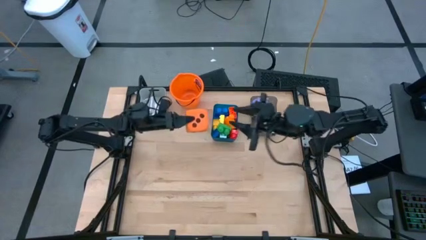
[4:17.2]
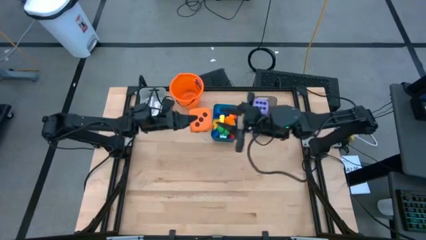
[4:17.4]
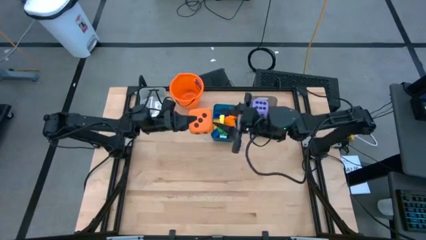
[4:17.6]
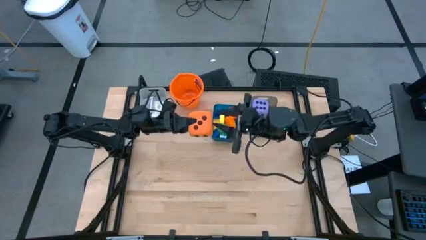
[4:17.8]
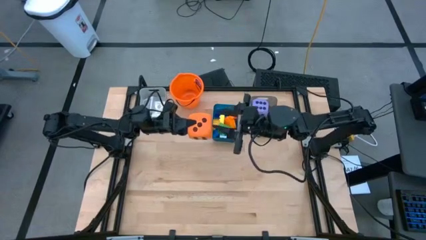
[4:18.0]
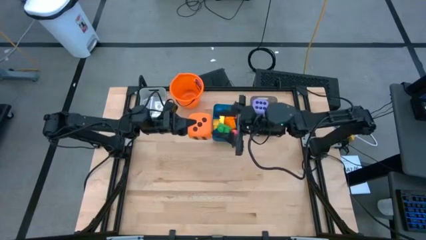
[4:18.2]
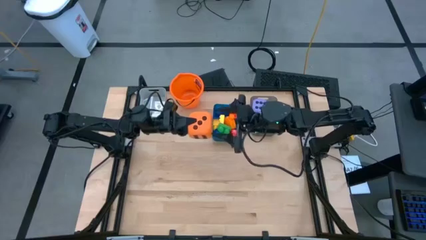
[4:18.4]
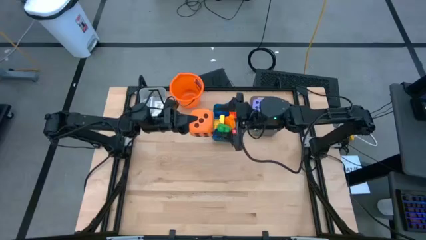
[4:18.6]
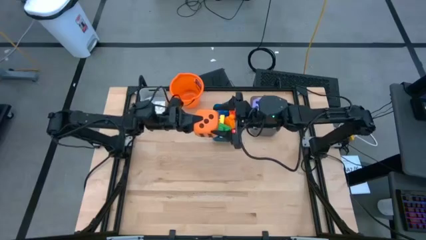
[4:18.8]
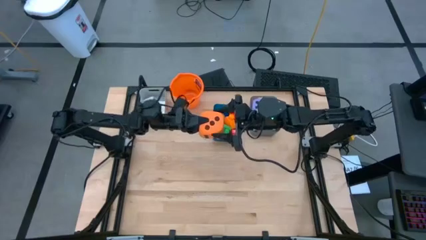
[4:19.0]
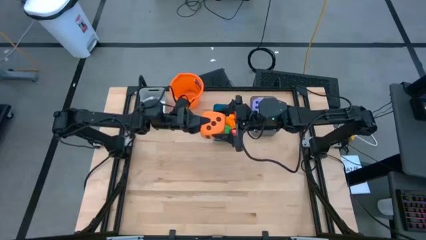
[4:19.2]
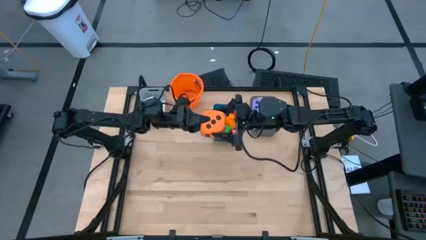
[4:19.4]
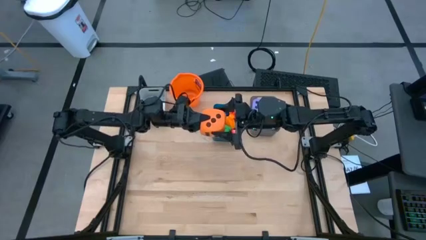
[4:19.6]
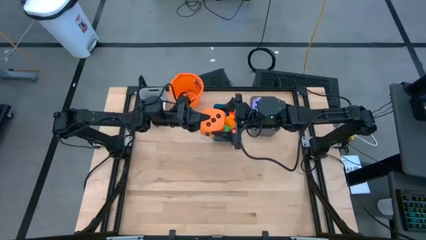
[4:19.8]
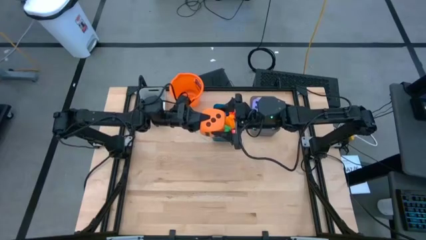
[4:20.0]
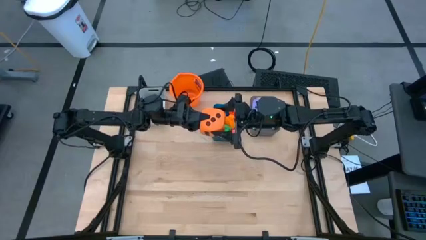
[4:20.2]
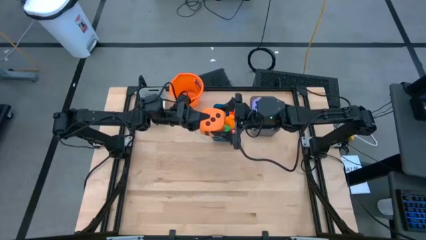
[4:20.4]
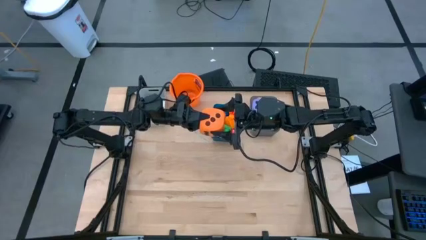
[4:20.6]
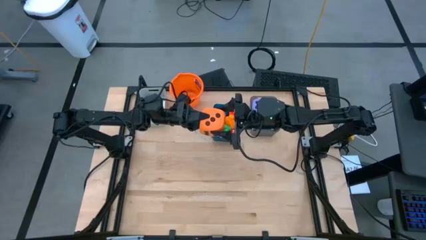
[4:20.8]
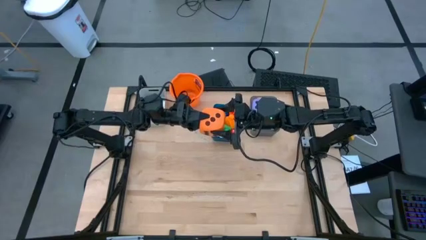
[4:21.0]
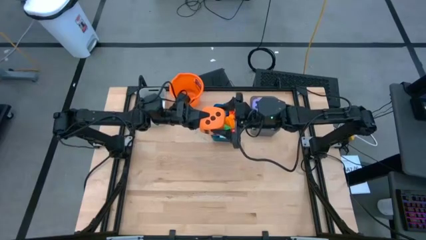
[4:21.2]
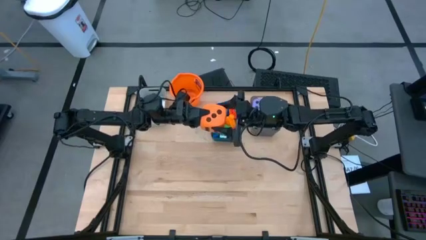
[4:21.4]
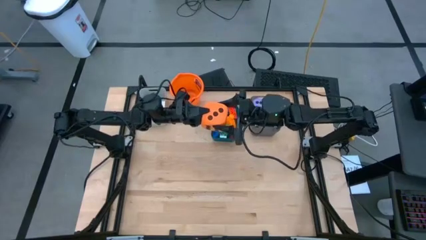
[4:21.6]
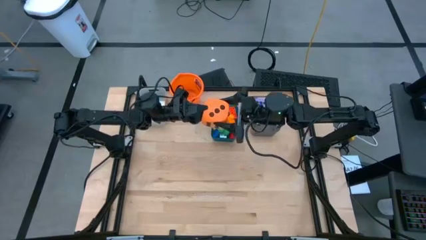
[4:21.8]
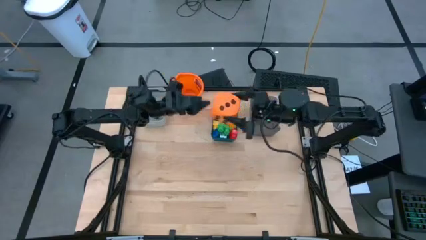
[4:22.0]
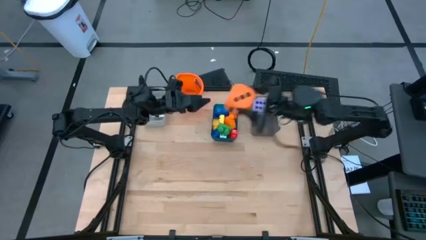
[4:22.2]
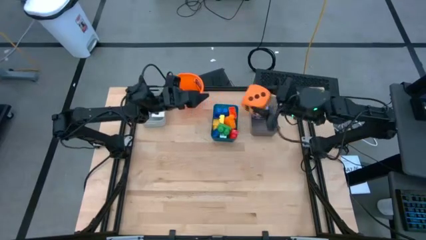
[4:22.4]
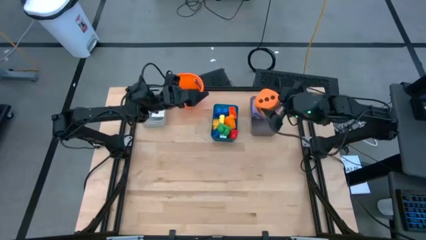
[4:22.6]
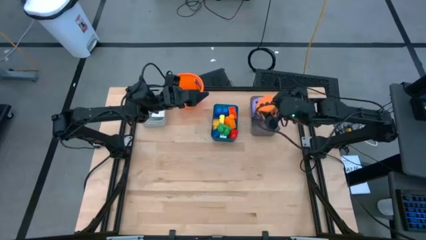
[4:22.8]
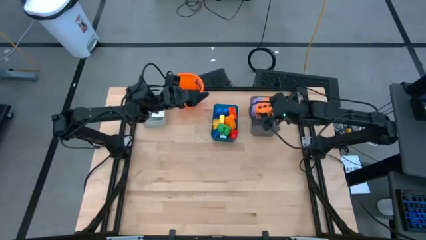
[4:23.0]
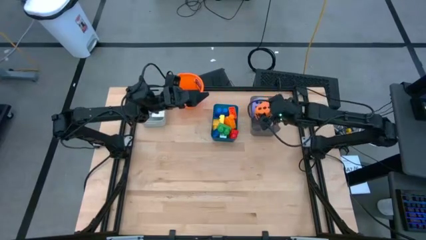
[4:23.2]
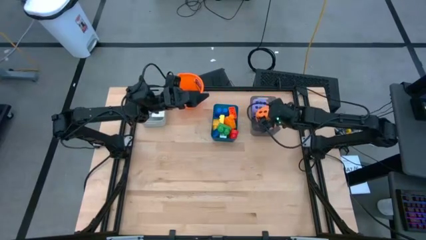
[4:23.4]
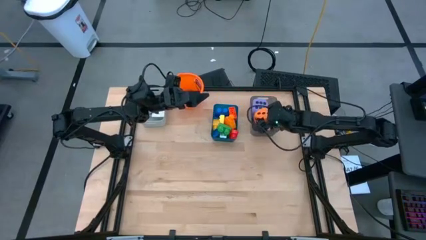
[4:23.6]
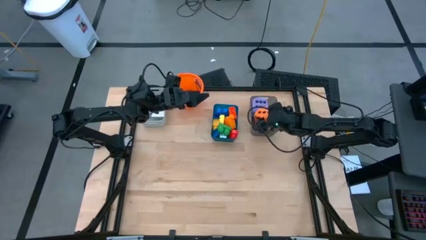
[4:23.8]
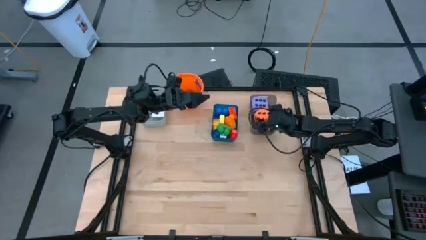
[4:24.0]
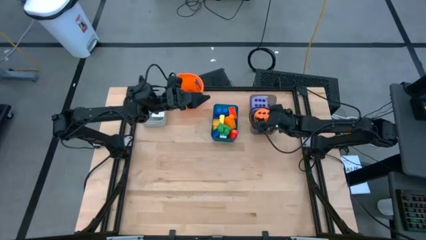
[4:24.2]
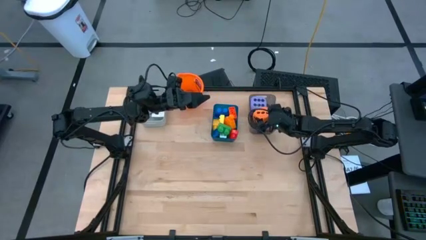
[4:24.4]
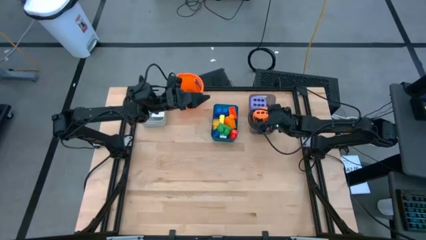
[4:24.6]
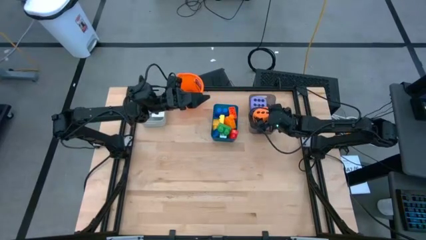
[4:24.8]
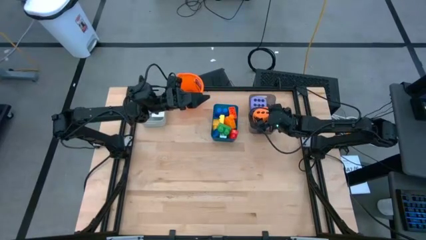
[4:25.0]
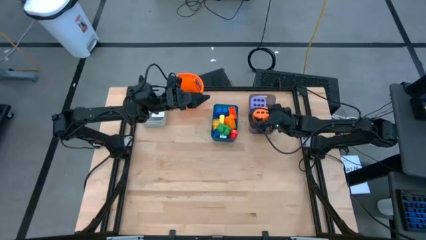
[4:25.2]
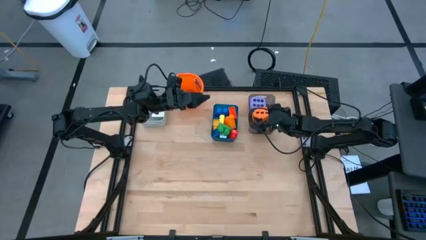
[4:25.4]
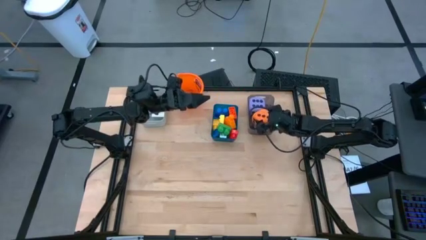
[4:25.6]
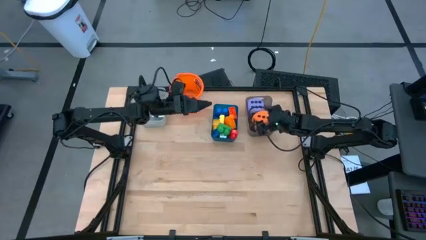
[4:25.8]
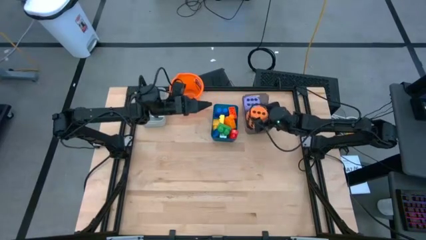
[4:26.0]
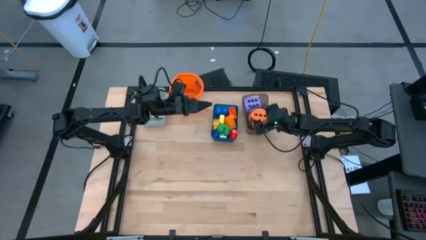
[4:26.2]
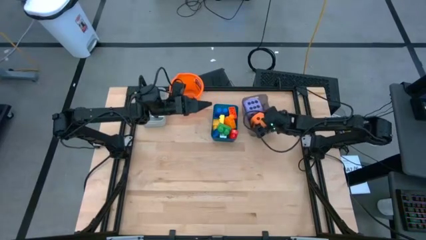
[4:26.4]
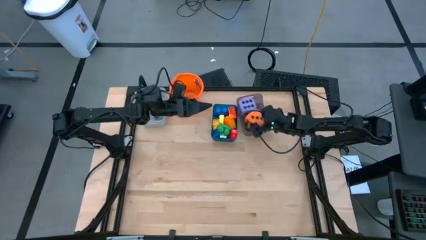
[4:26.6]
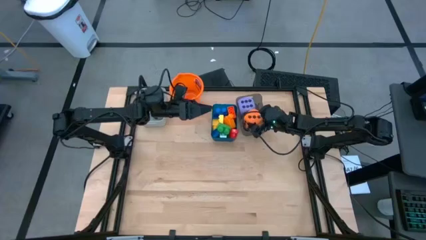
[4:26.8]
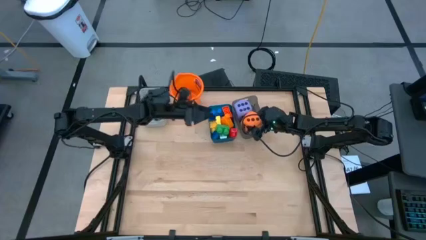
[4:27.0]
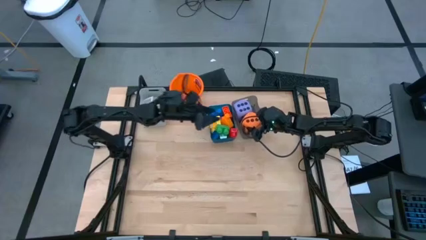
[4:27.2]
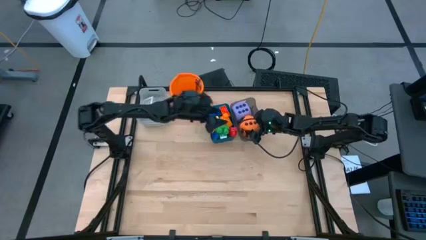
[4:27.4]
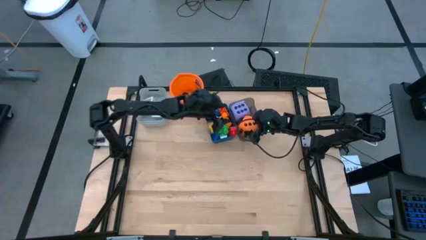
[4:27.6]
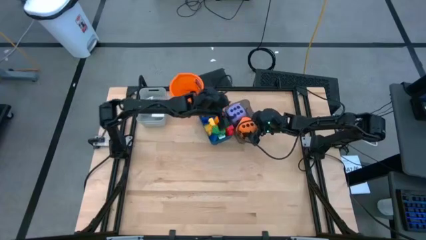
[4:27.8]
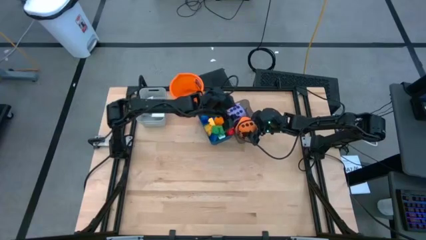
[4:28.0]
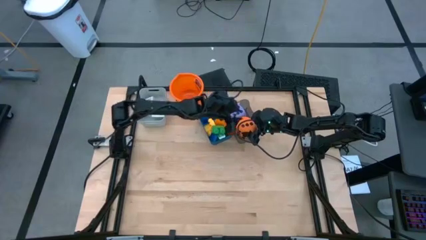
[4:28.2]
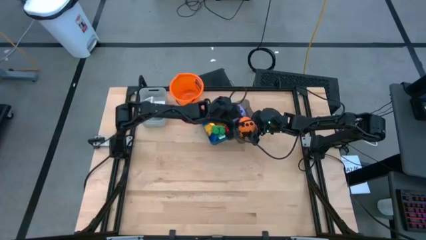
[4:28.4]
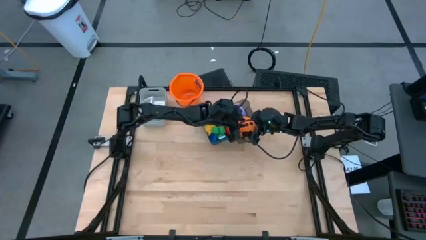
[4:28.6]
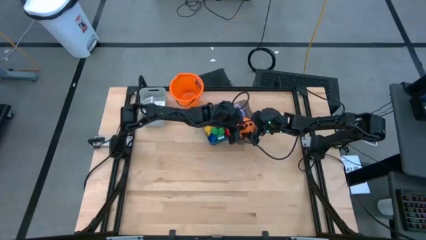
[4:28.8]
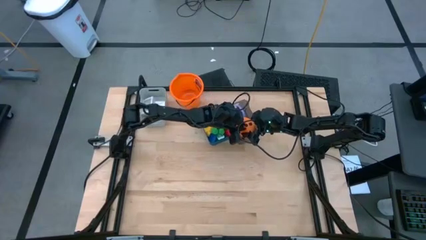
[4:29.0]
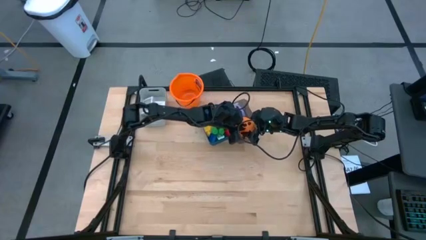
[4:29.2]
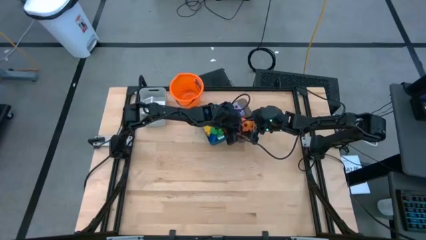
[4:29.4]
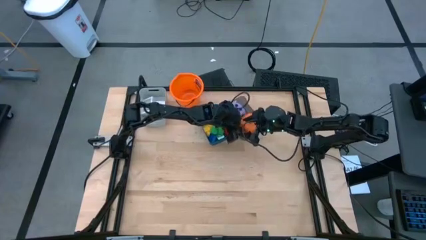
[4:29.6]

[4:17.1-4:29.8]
Task: Pick & Place Toys
Put the orange dice into the black bin

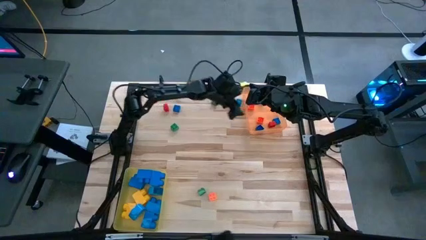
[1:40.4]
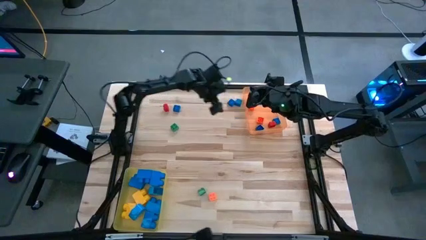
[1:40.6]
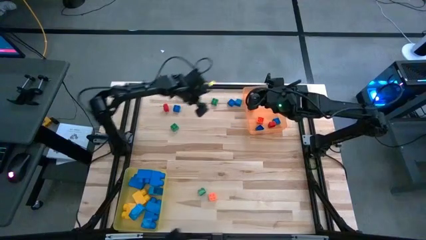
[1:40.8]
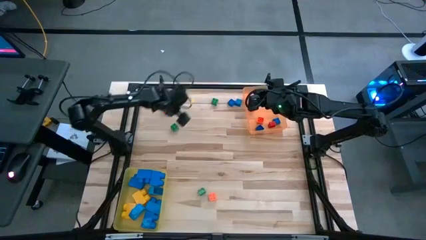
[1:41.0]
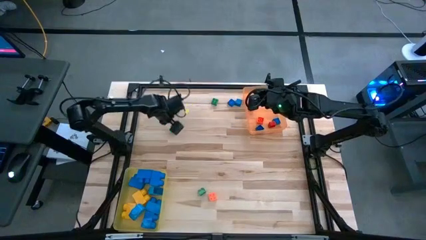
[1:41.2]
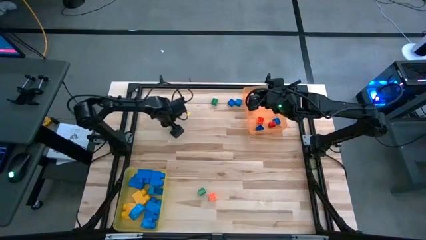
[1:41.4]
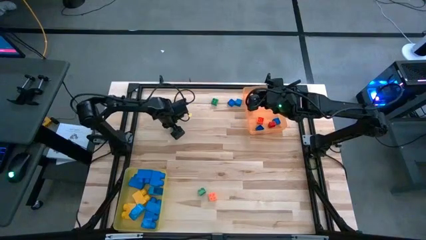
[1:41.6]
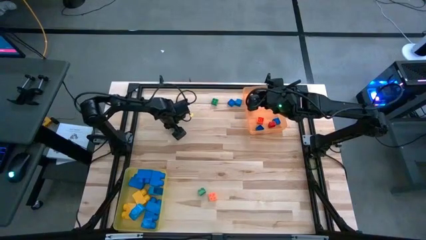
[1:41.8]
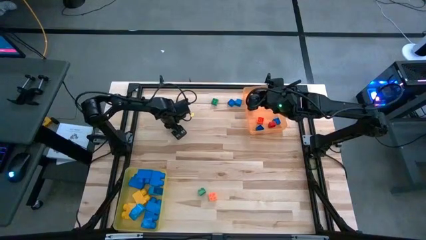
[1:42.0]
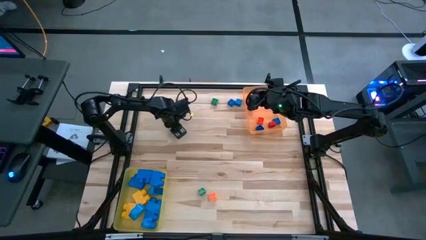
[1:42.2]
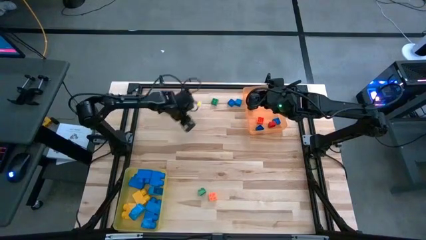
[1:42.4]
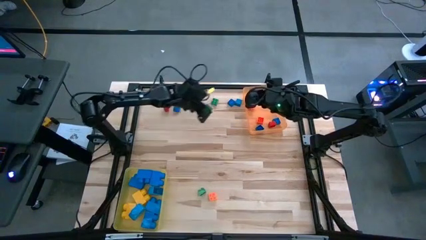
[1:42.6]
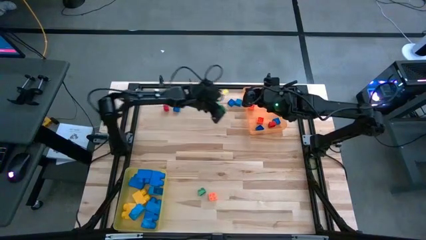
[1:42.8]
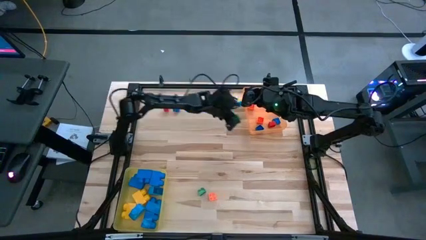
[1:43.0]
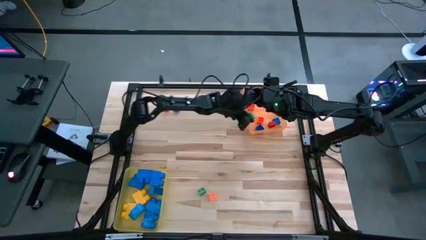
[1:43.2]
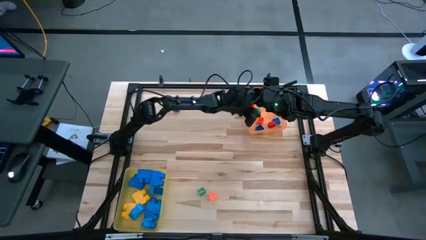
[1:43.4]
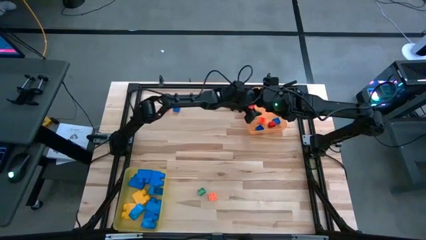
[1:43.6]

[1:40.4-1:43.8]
Task: Sort blocks by size
Put the small green game piece into the orange bin
